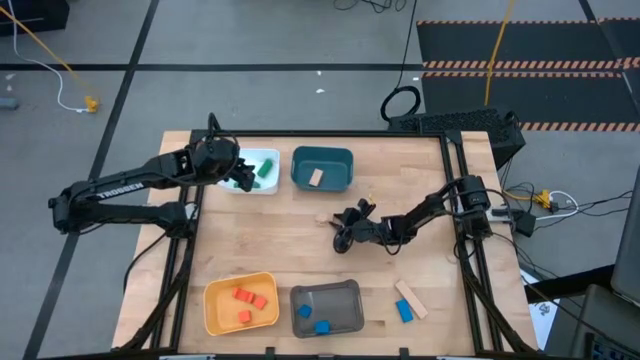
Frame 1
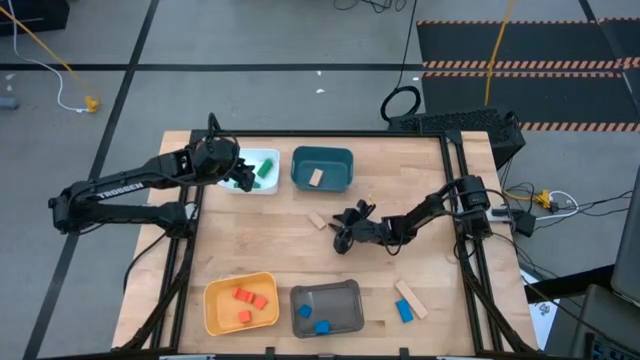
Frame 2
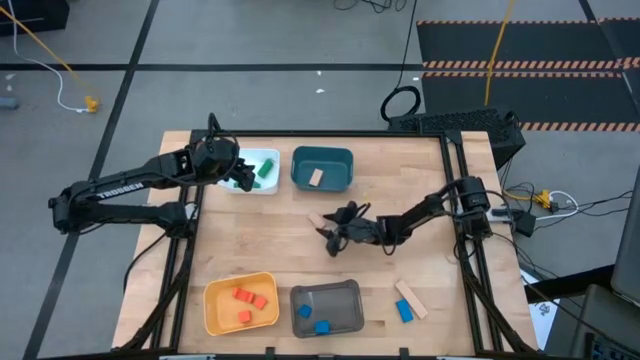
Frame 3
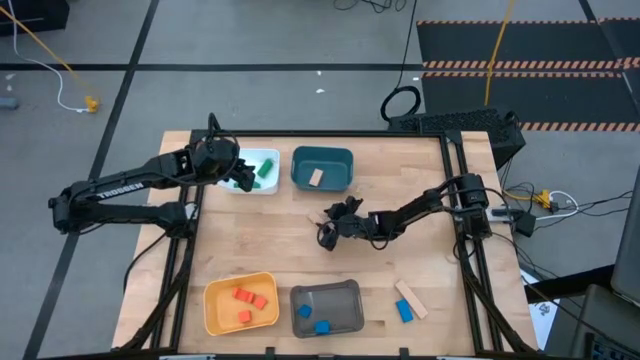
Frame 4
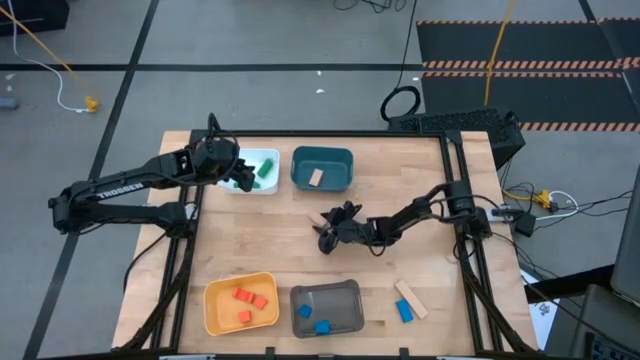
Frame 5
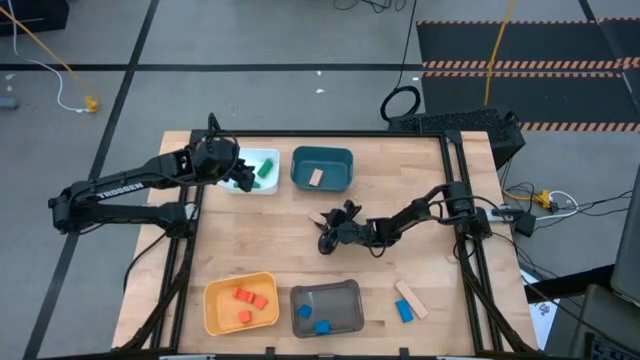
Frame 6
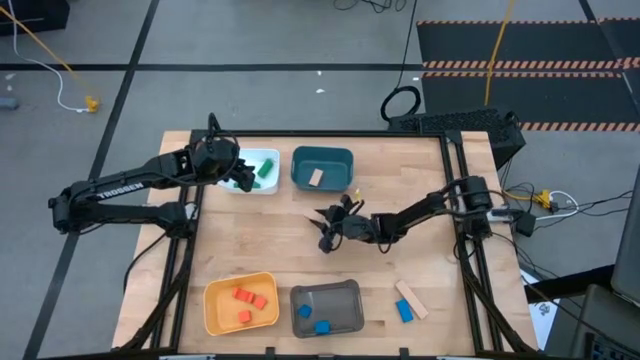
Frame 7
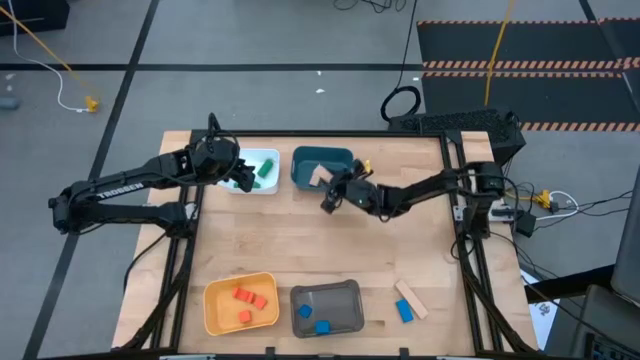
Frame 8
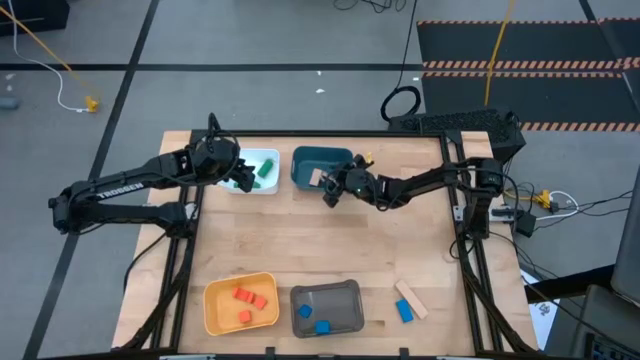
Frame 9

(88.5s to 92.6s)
Task: Sort & place blocks by color
Put the top brown block into the blue bin

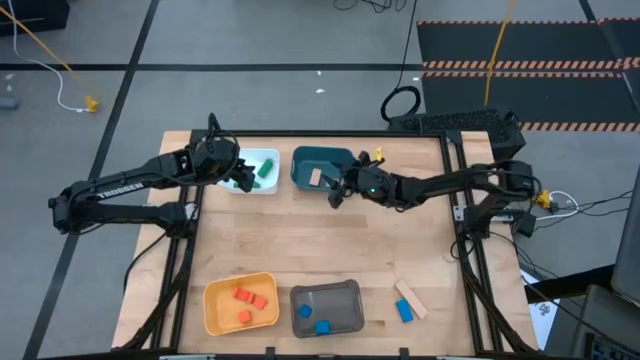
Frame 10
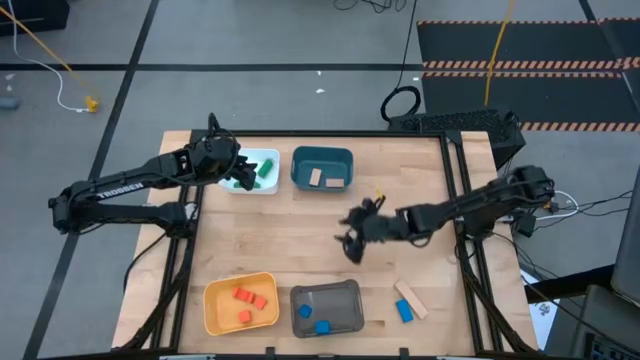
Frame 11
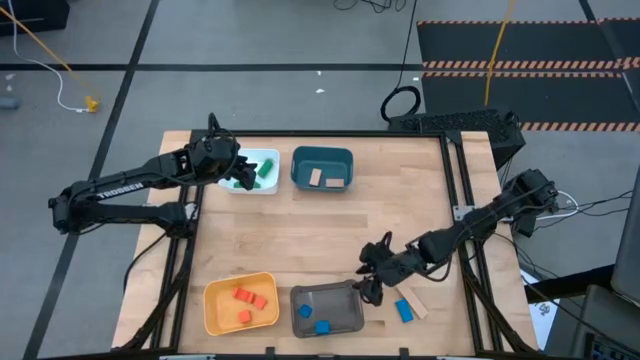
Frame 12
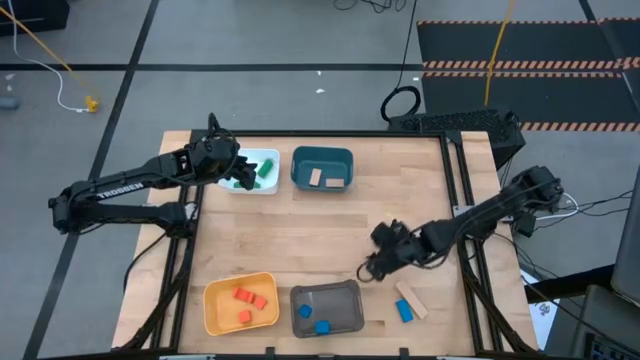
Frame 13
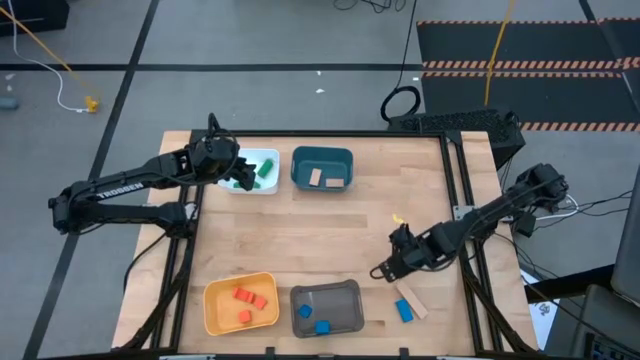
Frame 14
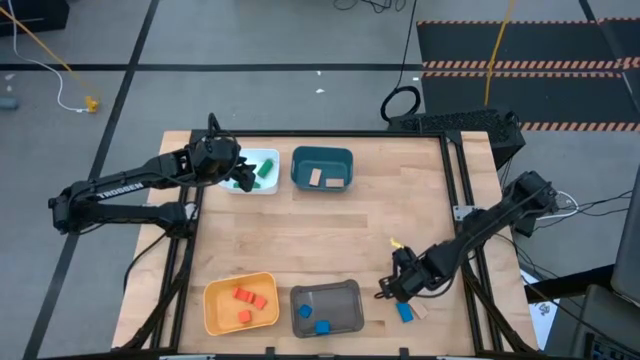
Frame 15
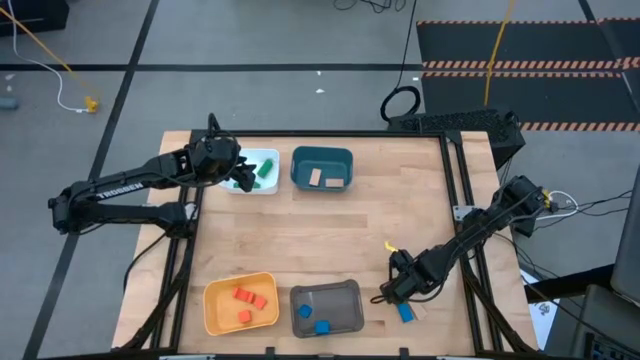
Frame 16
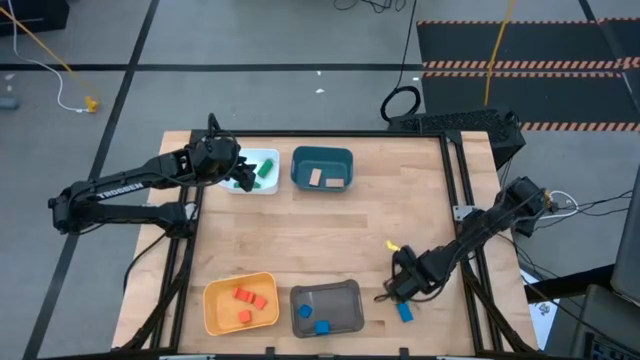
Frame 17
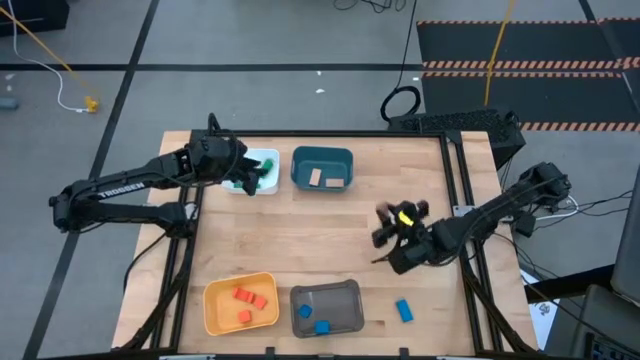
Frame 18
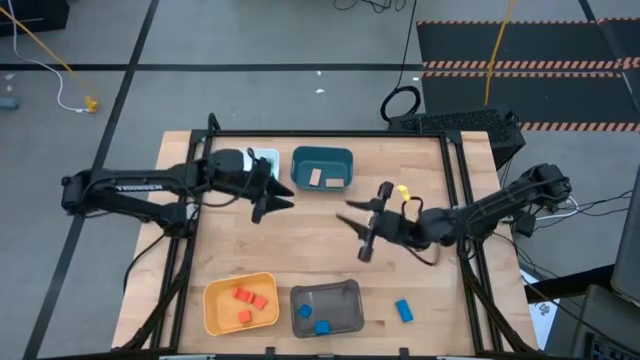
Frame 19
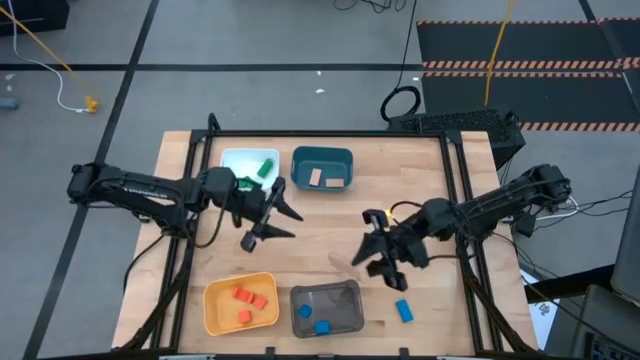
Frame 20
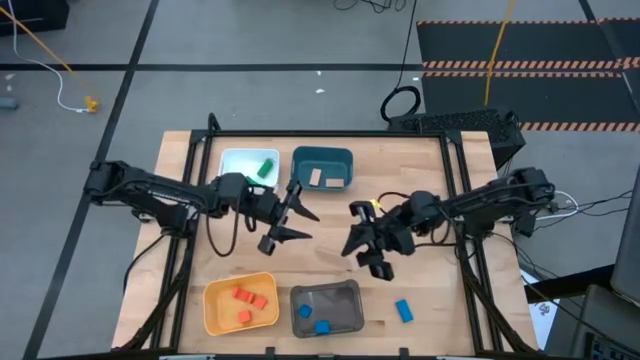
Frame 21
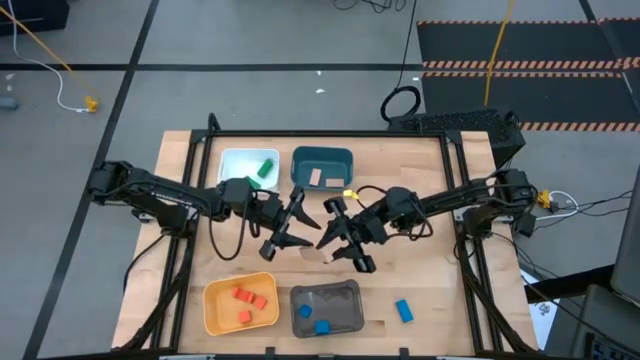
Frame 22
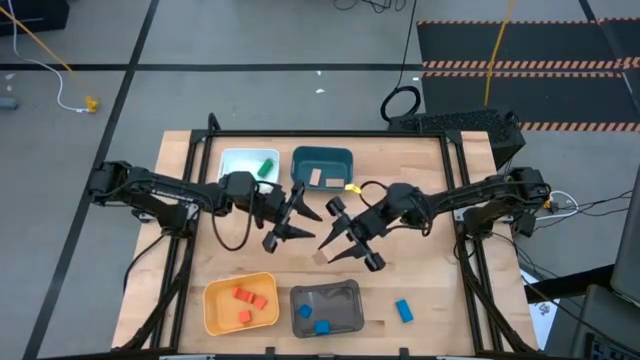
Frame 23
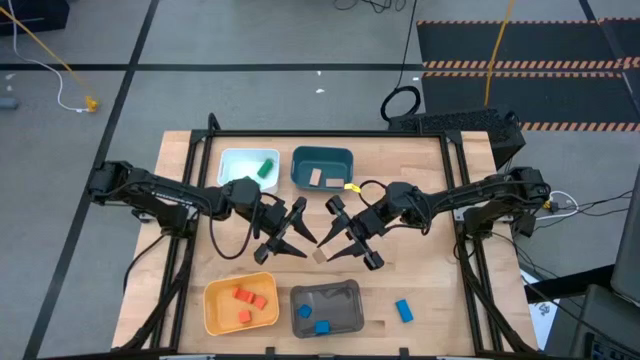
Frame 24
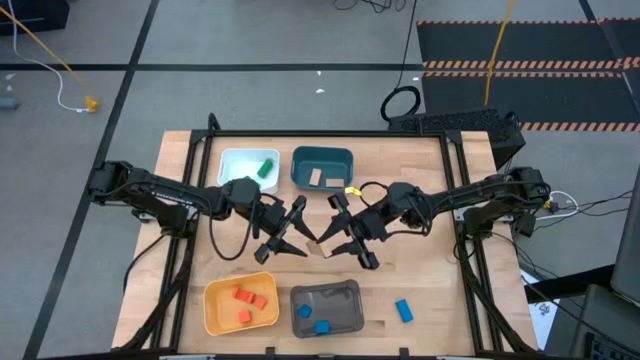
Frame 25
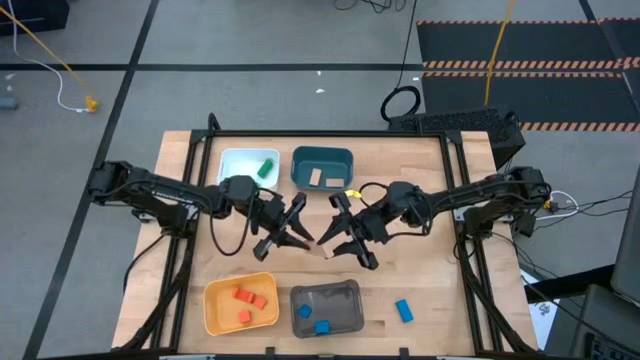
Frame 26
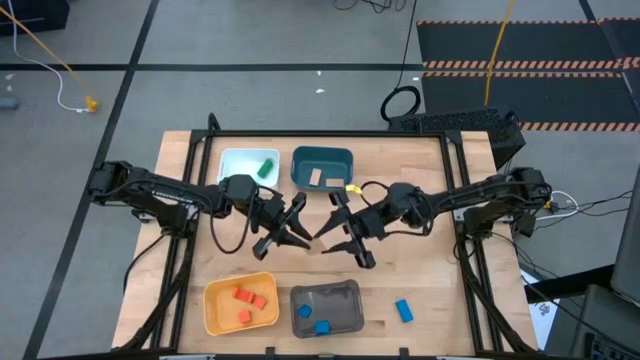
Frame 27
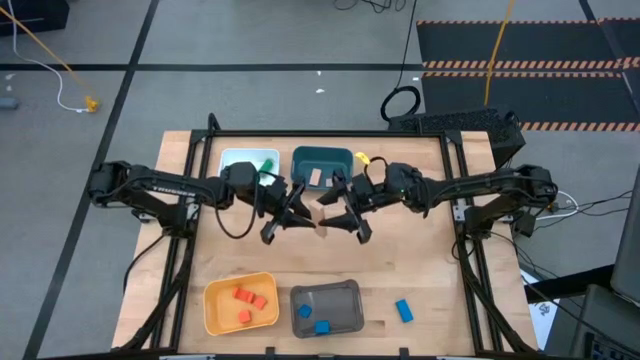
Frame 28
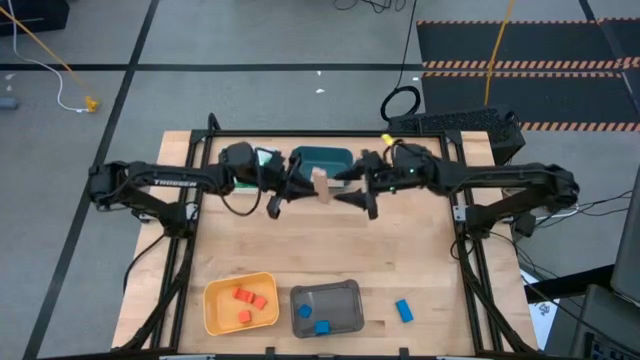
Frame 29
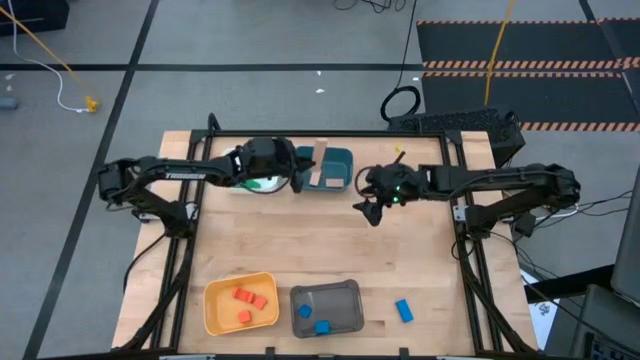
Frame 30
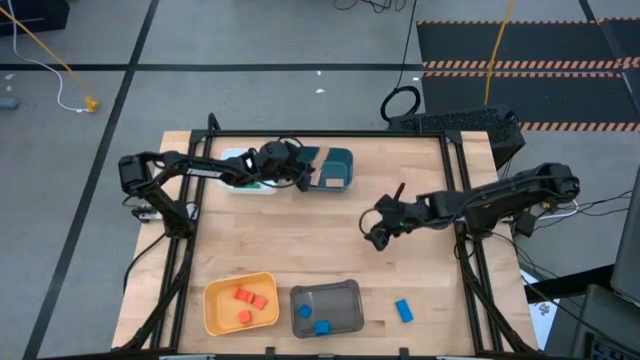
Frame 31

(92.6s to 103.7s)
Put the brown block into the blue bin

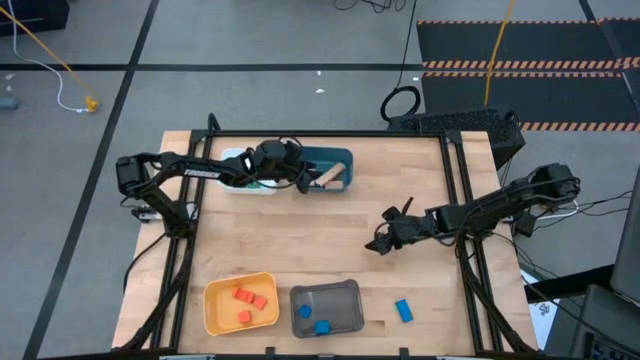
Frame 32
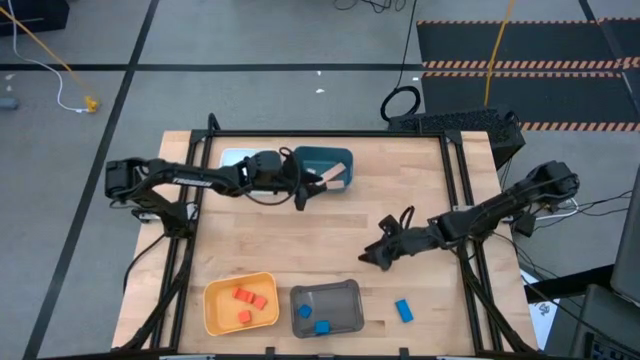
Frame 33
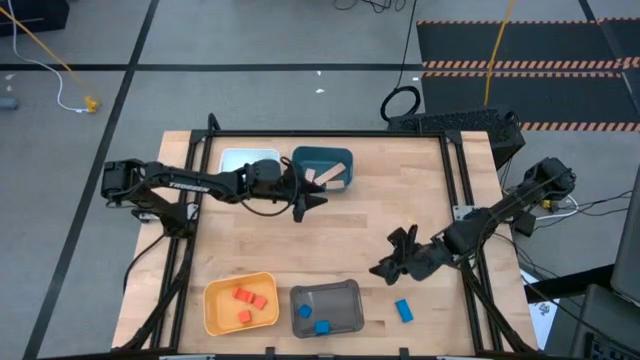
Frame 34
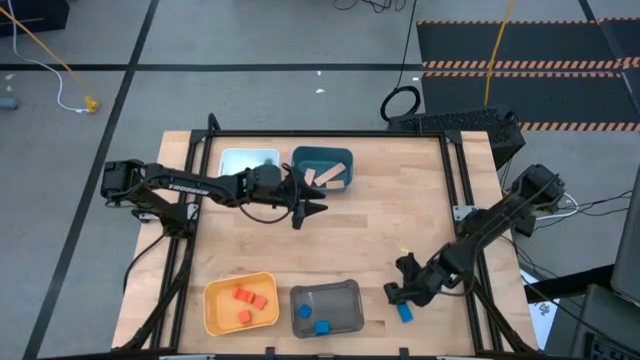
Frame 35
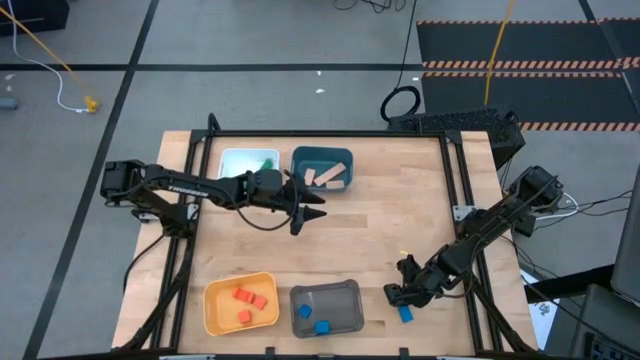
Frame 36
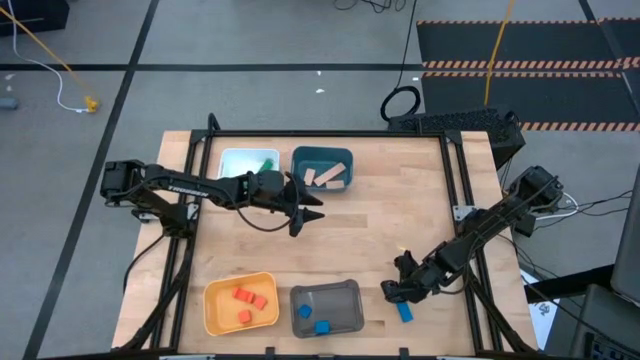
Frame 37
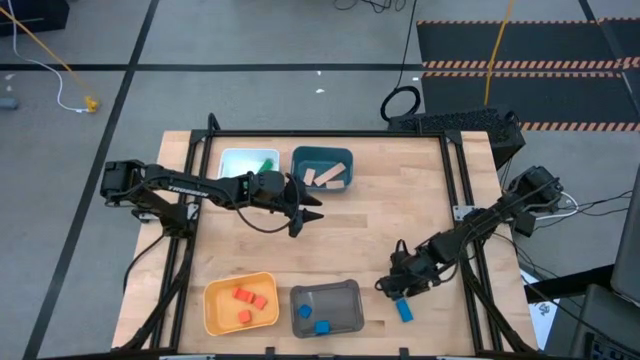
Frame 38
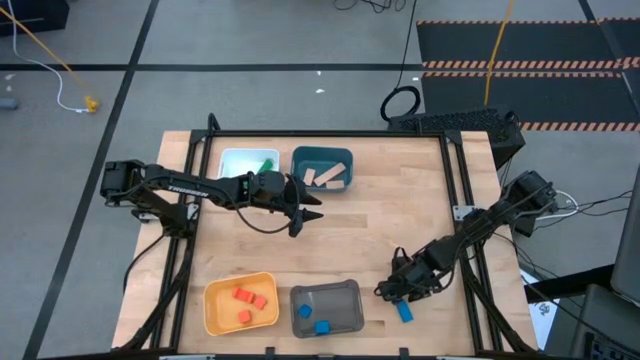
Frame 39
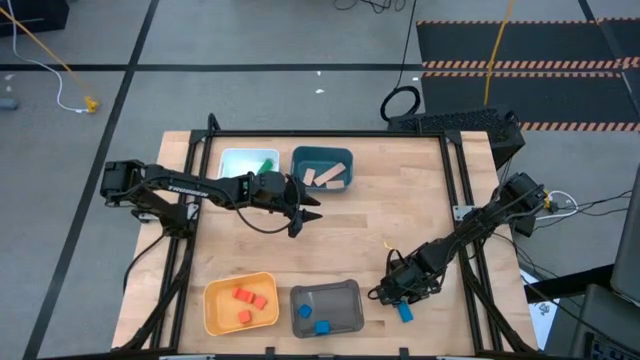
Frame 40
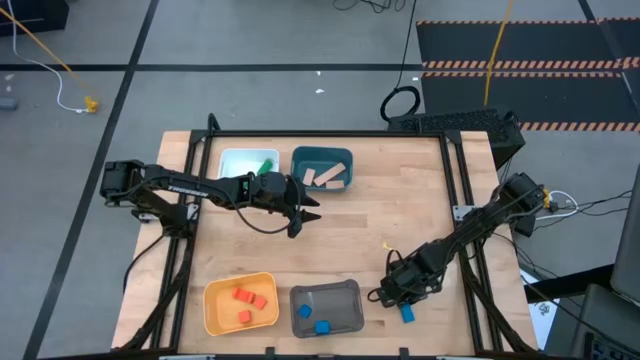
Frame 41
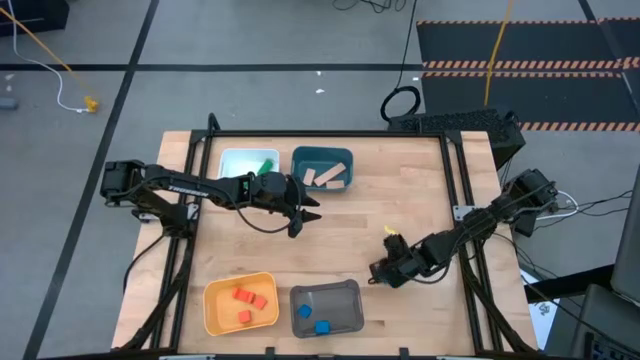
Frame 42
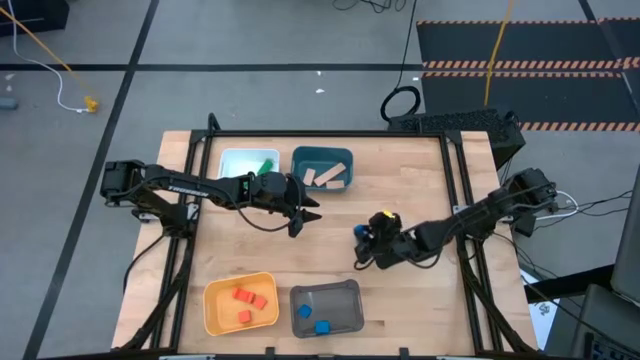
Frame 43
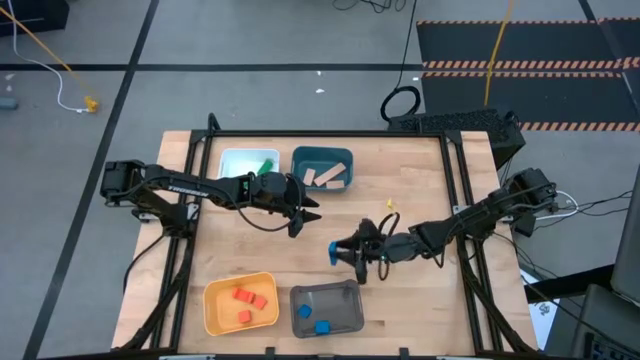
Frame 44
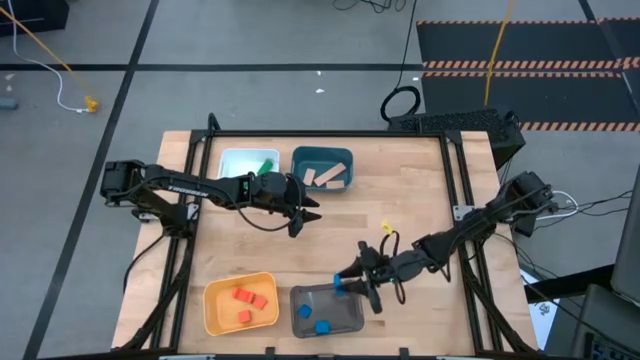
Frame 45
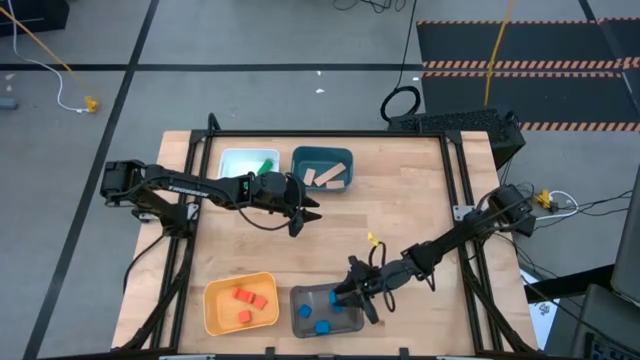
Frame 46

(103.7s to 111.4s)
Put the blue block into the black bin
